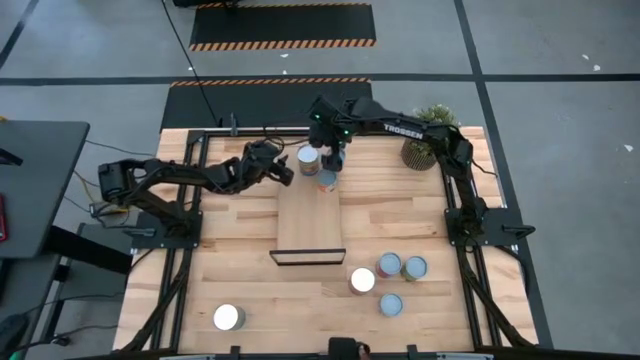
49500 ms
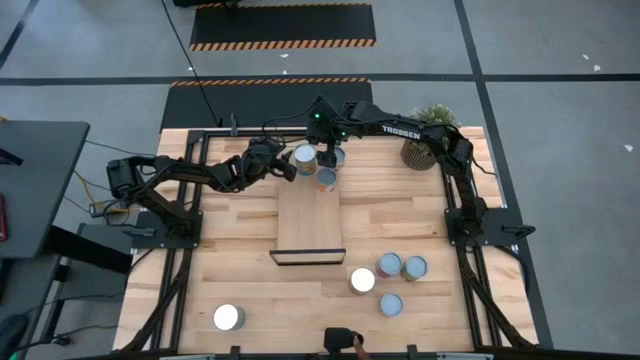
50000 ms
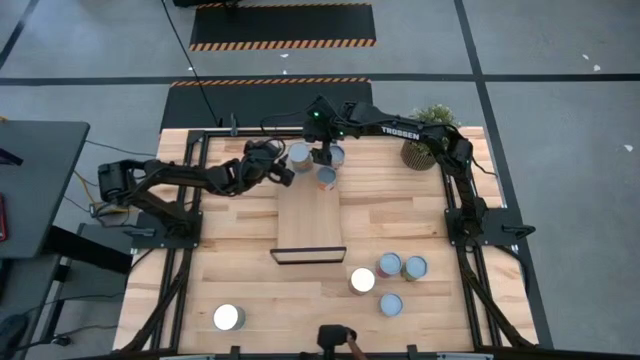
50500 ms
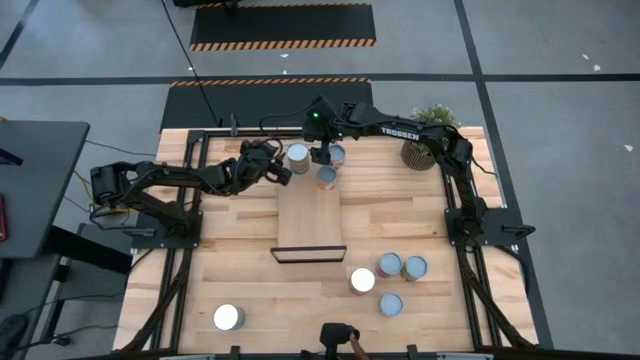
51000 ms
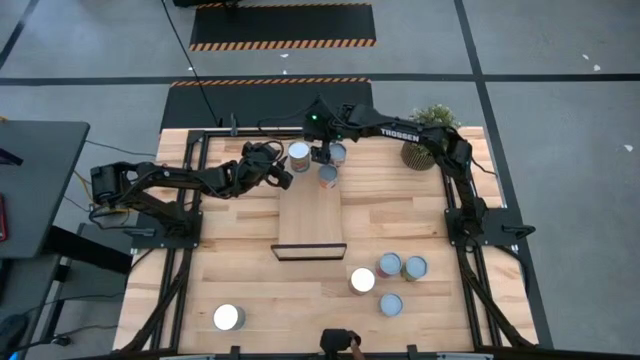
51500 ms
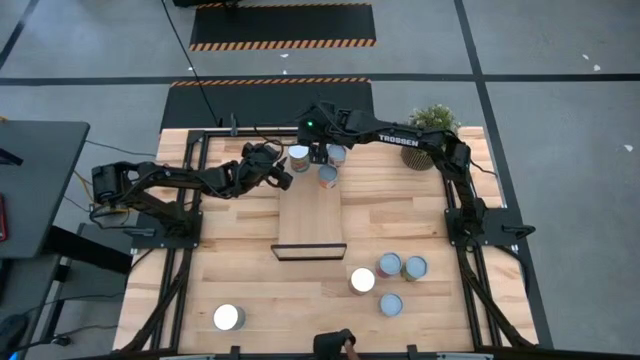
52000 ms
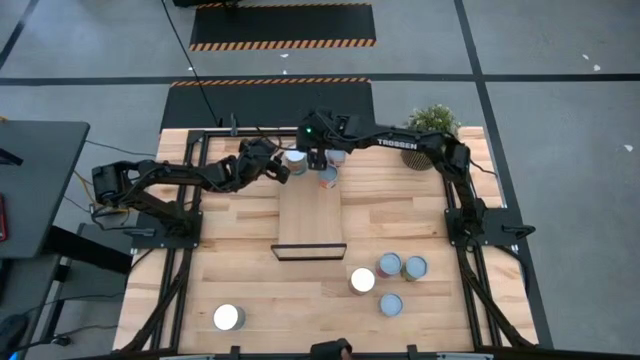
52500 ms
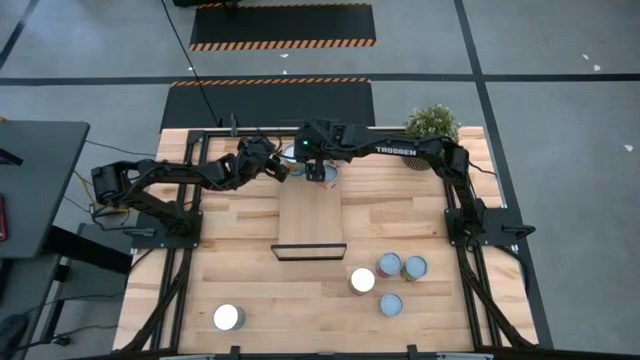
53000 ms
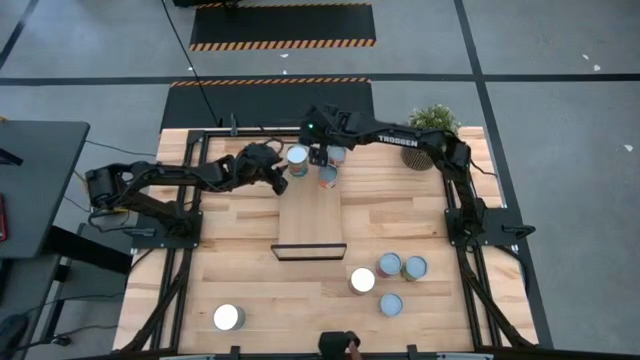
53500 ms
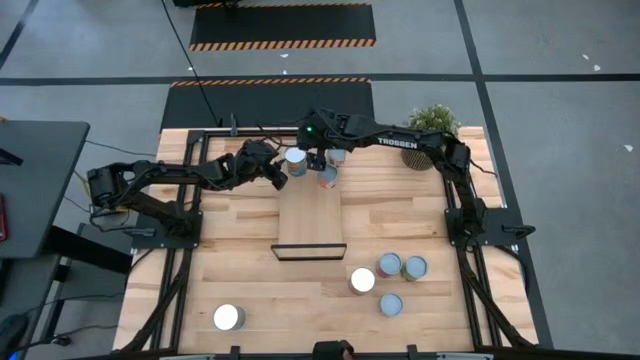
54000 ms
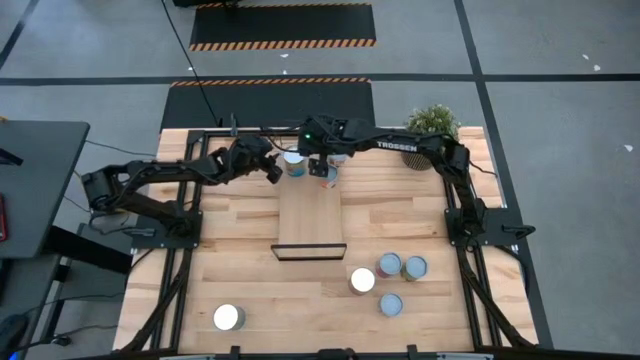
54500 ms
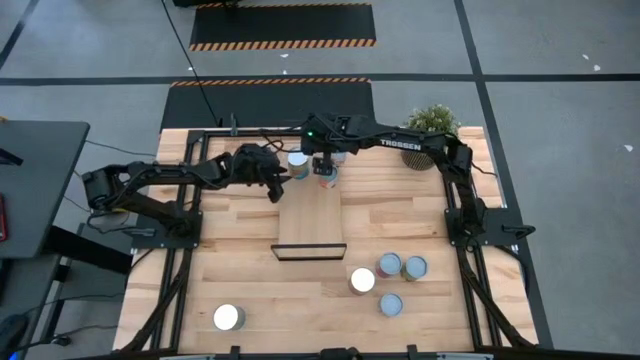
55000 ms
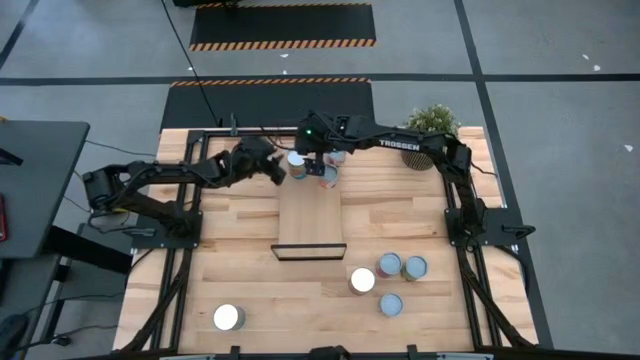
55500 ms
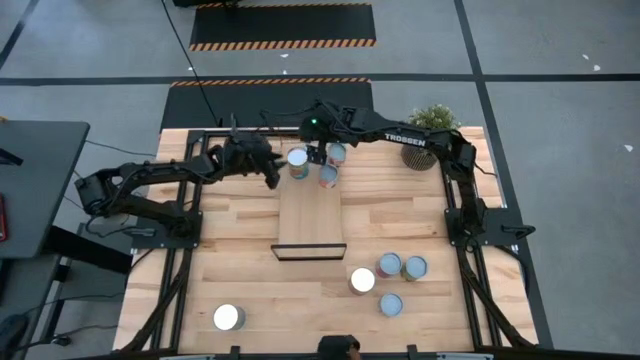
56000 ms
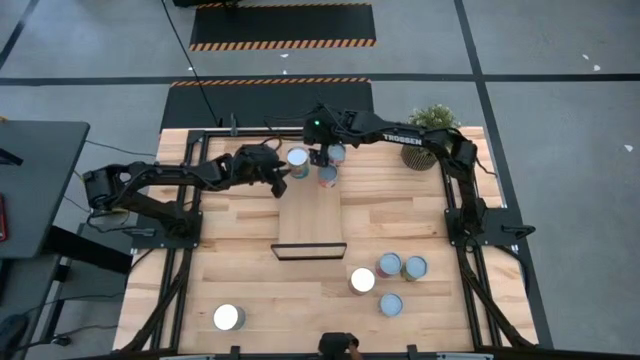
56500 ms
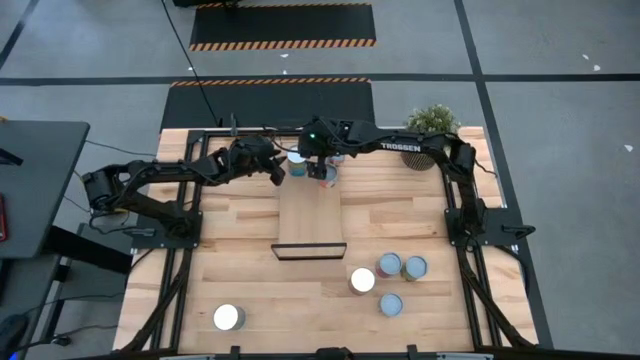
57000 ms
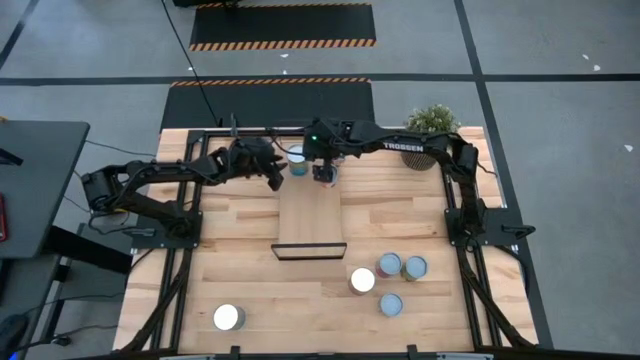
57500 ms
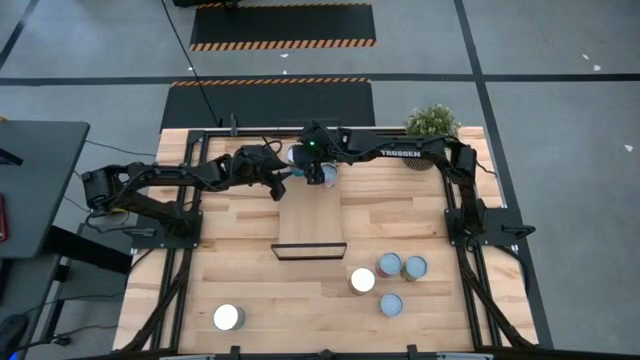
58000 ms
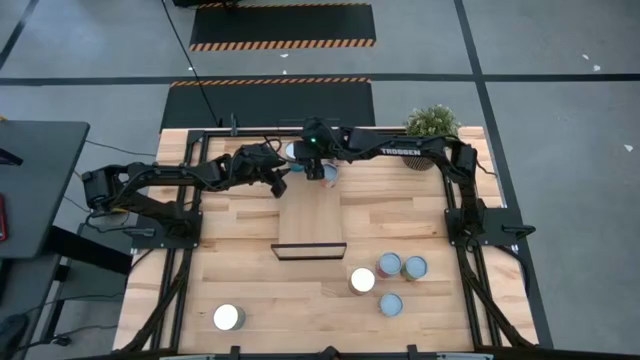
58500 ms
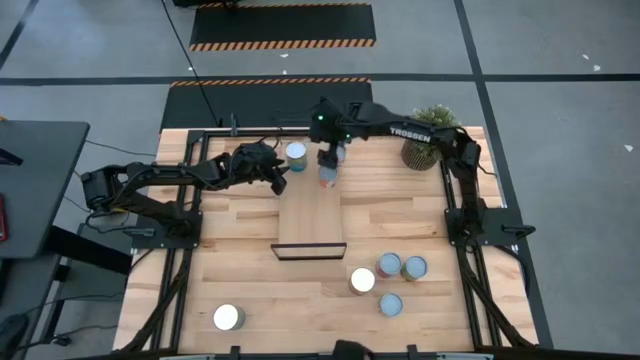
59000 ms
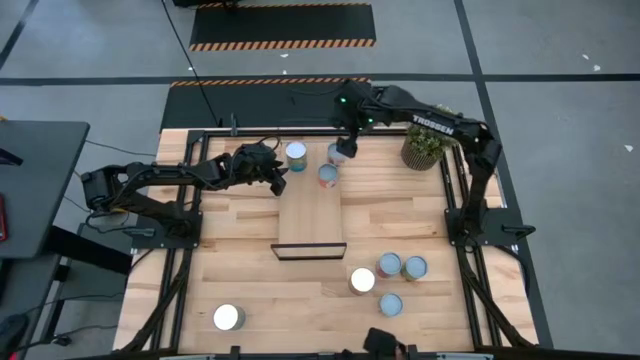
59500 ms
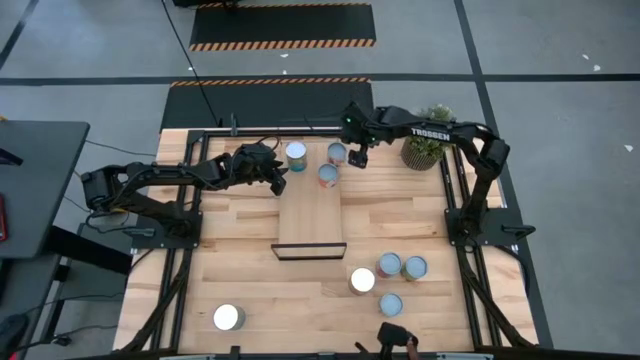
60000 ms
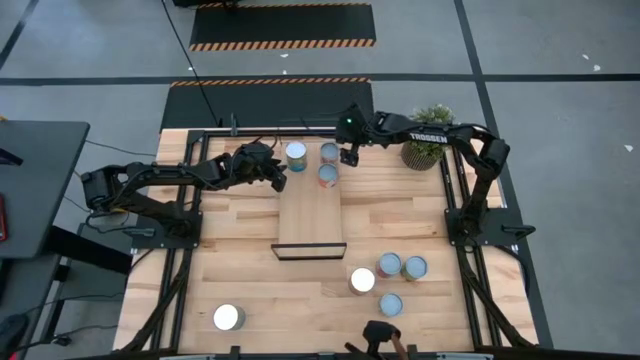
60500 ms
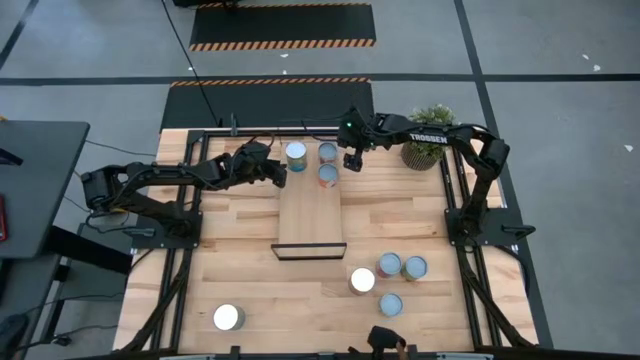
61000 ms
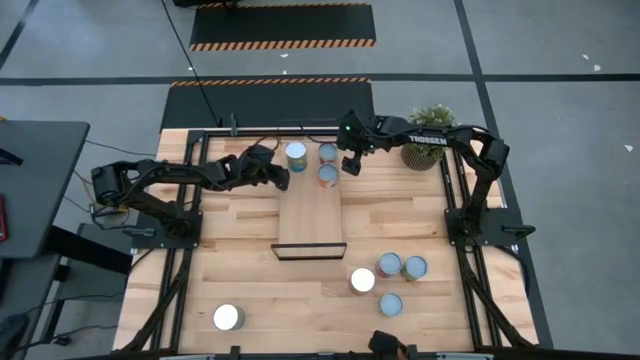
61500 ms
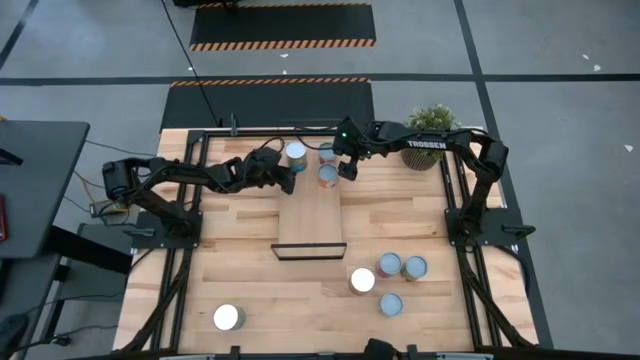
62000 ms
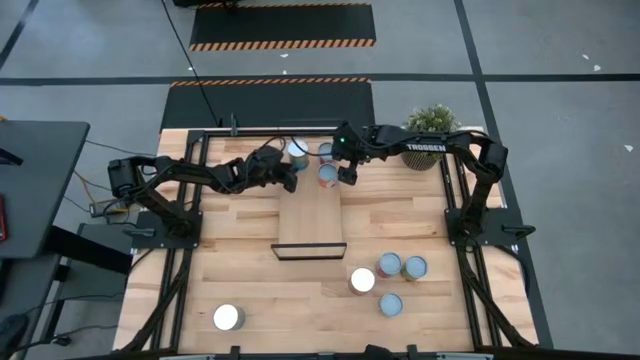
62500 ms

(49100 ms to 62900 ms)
Task: Pick and place cans onto a shelf
Put the blue can on the shelf

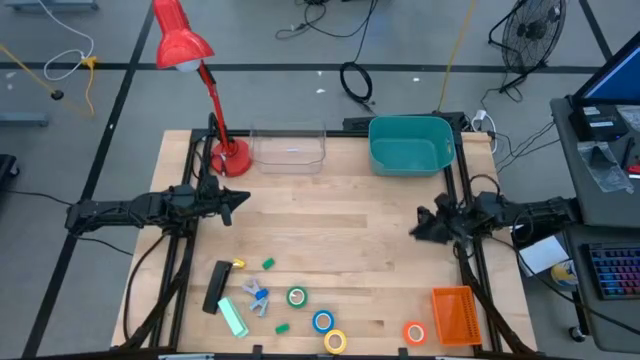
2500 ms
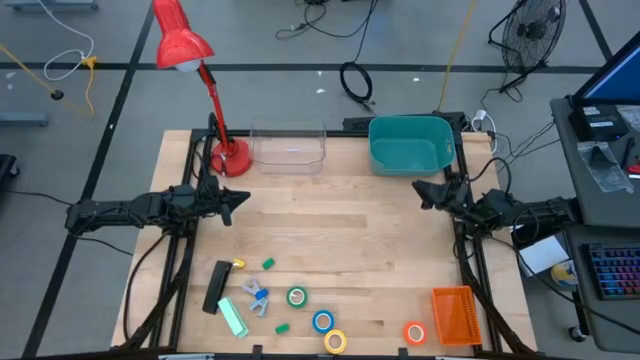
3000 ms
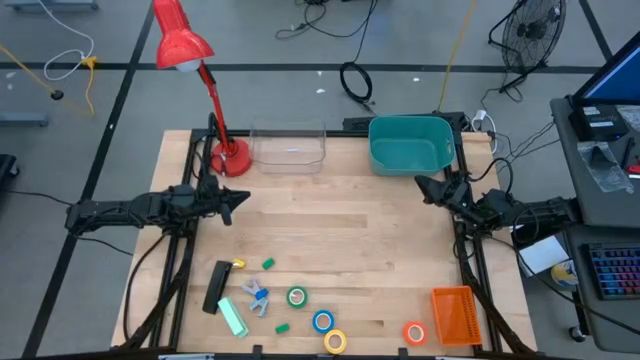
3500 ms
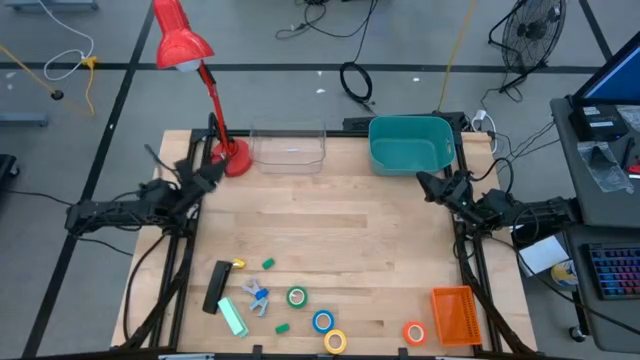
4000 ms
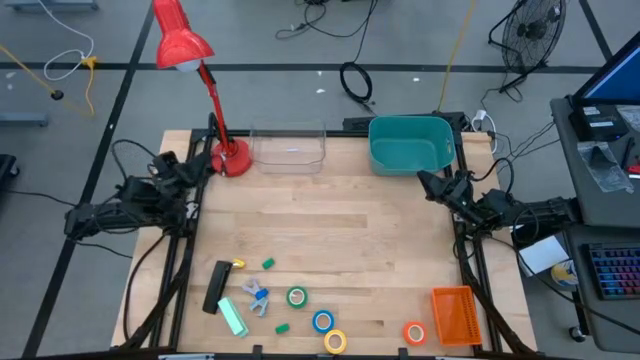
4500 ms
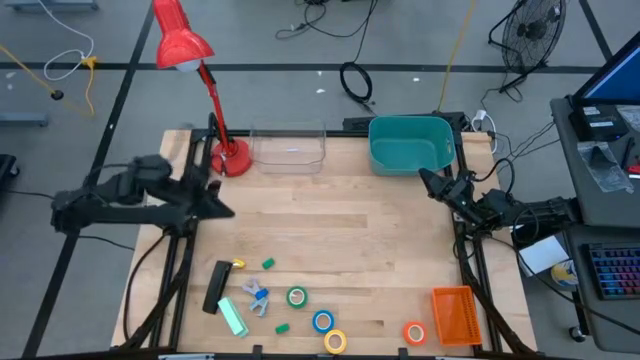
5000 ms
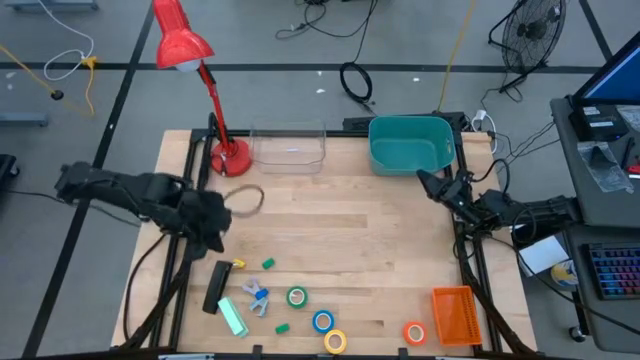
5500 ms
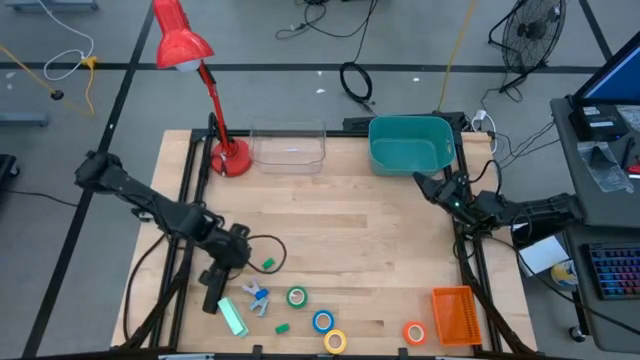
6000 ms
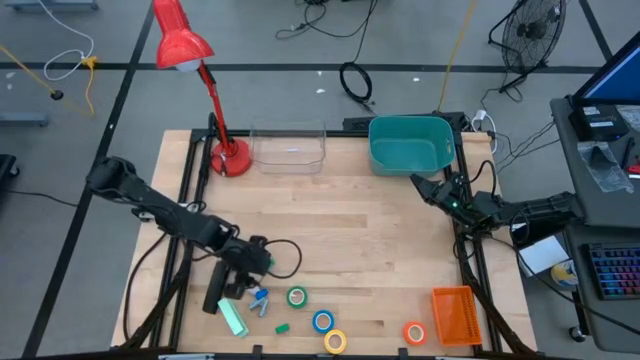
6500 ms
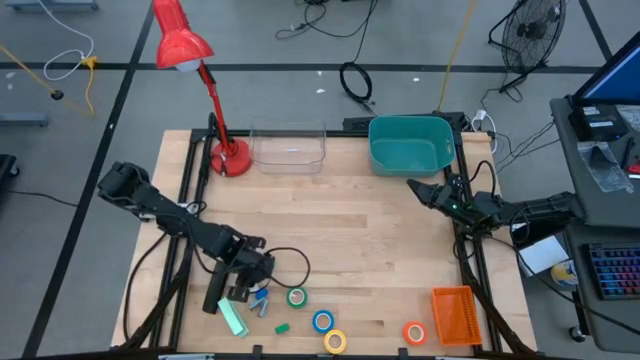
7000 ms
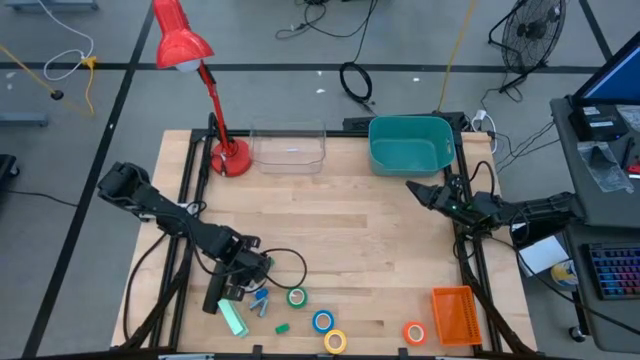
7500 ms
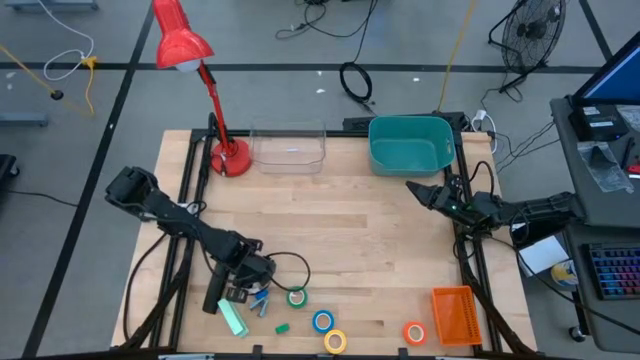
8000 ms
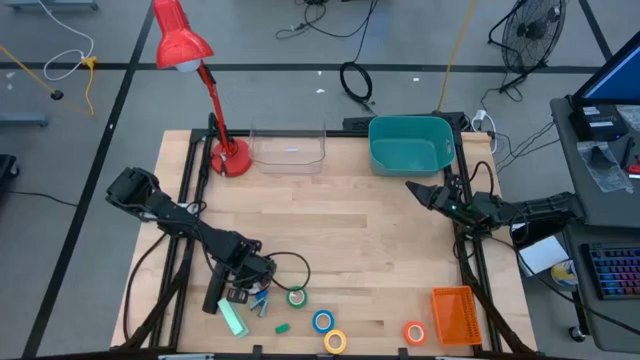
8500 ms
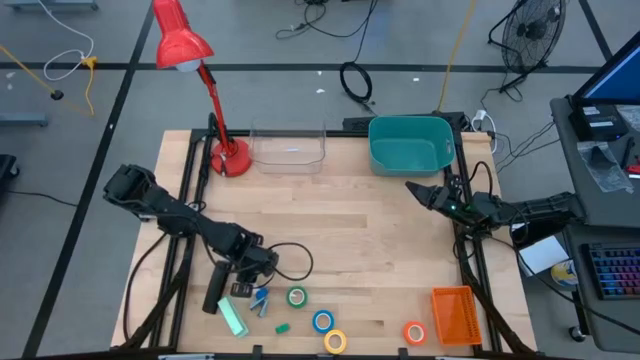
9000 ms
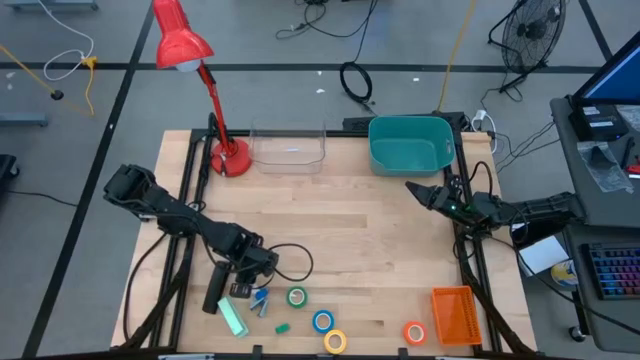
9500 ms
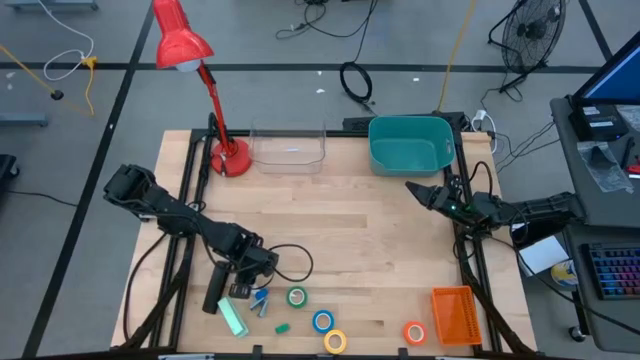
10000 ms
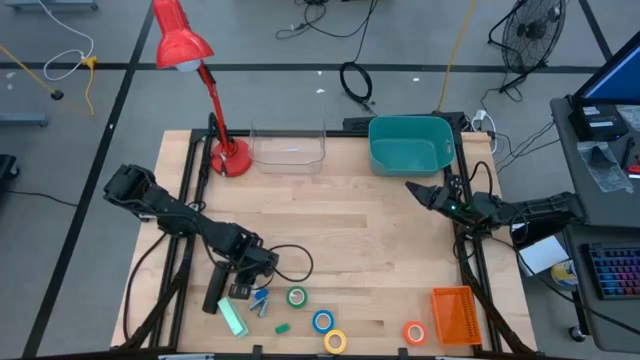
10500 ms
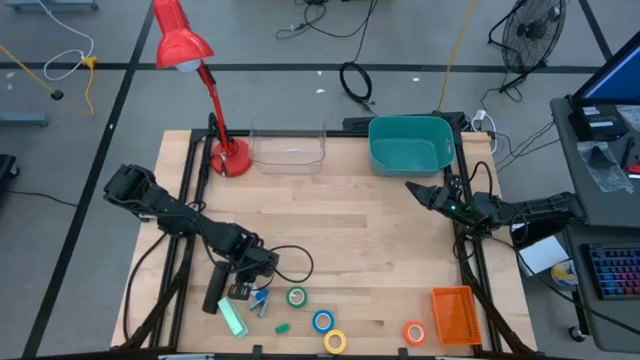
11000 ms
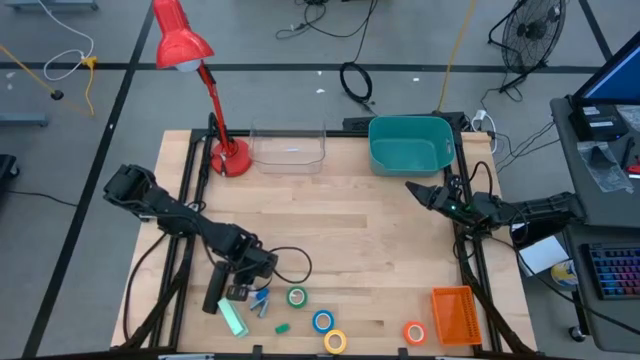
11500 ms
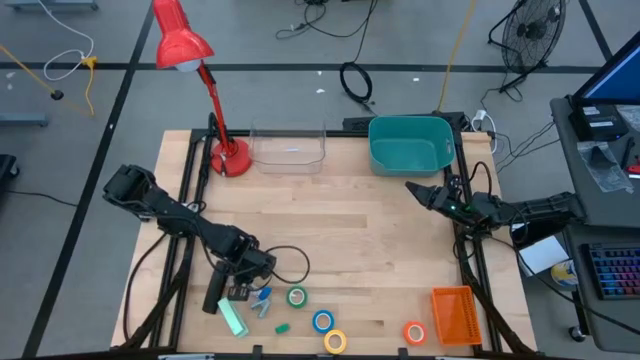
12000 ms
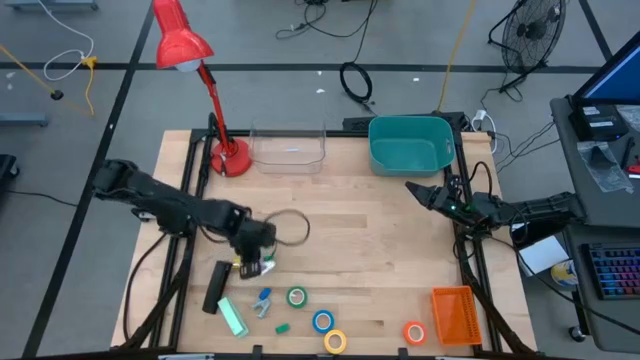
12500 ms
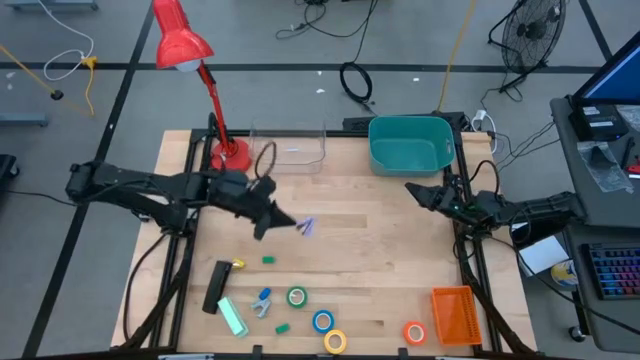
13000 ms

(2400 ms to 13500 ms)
Task: Pick and place Stapler, Stapler remover, tape
Put the violet staple remover into the orange bin
